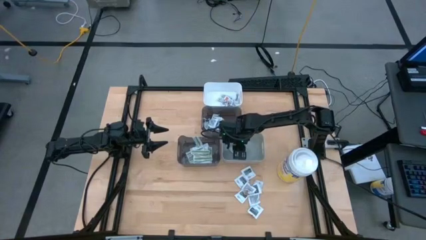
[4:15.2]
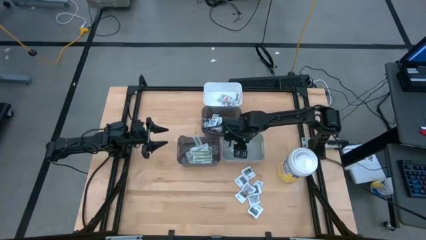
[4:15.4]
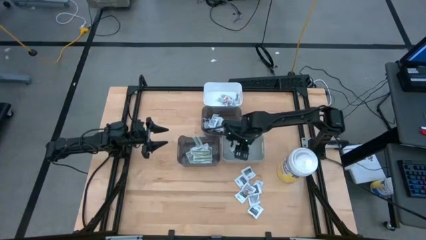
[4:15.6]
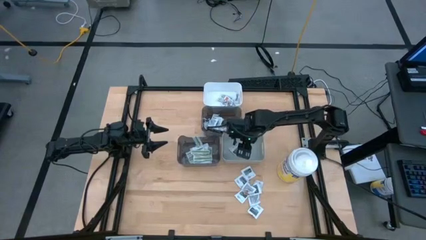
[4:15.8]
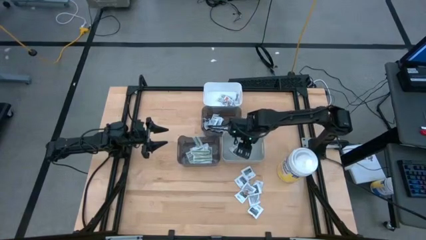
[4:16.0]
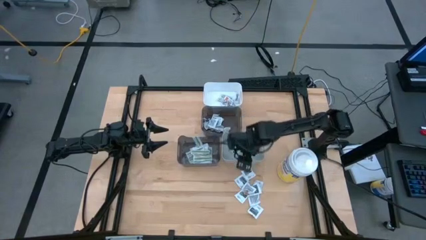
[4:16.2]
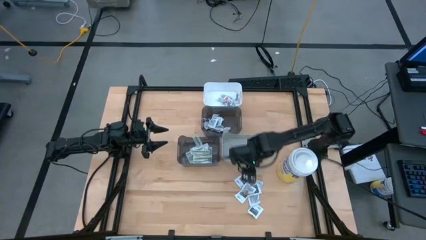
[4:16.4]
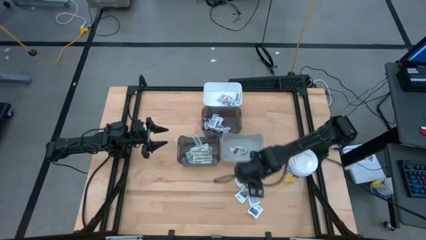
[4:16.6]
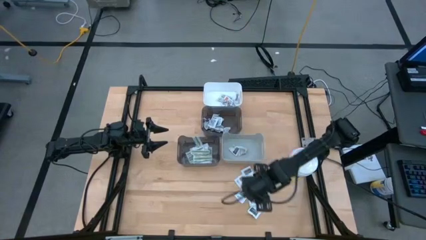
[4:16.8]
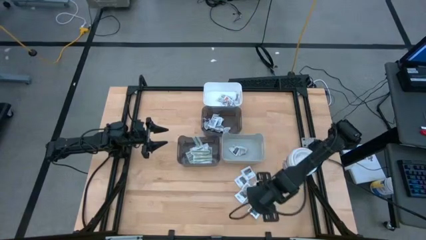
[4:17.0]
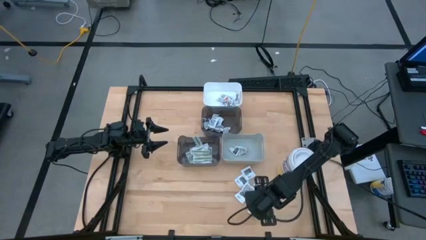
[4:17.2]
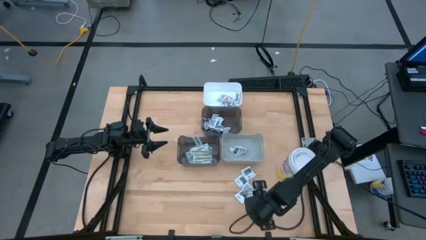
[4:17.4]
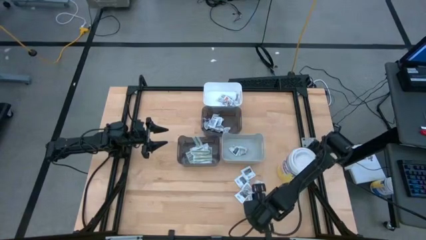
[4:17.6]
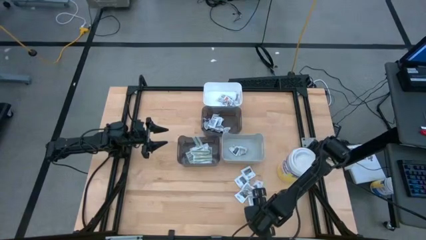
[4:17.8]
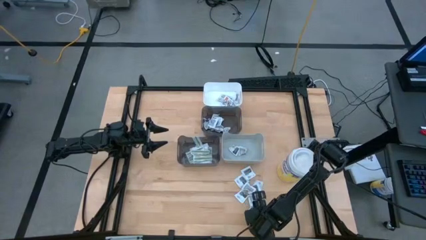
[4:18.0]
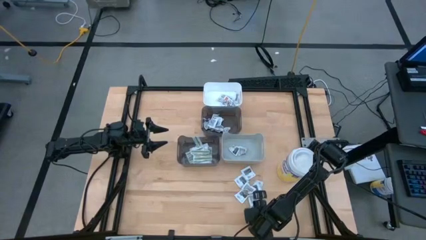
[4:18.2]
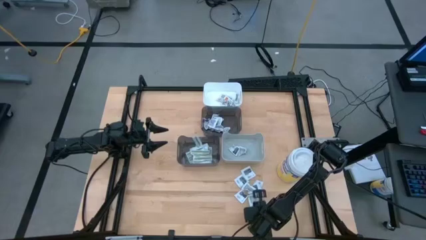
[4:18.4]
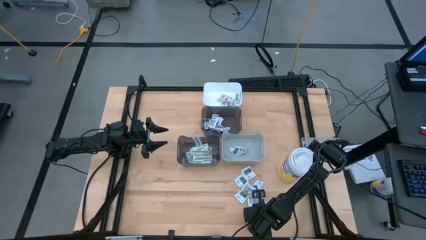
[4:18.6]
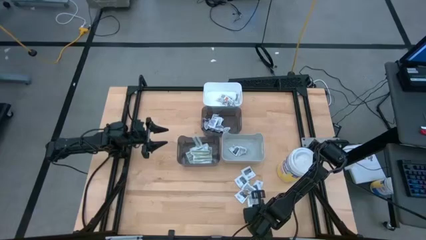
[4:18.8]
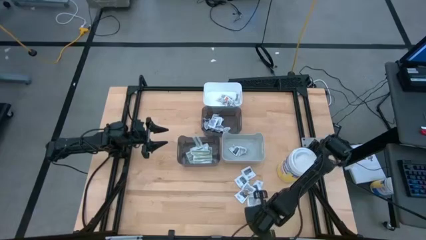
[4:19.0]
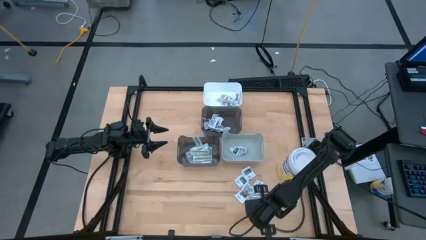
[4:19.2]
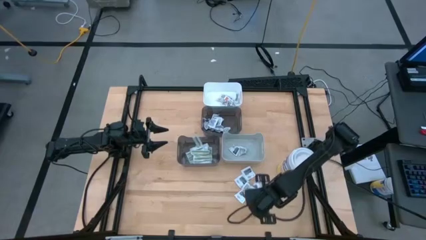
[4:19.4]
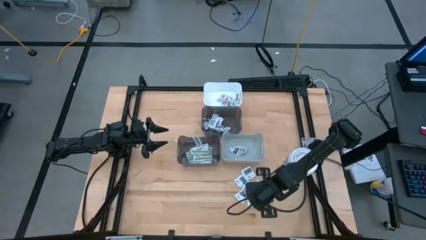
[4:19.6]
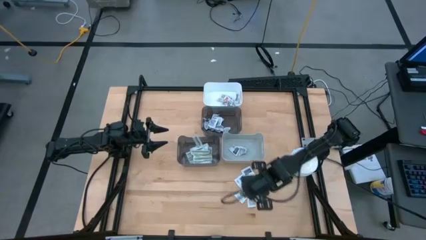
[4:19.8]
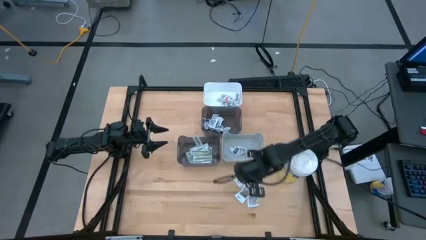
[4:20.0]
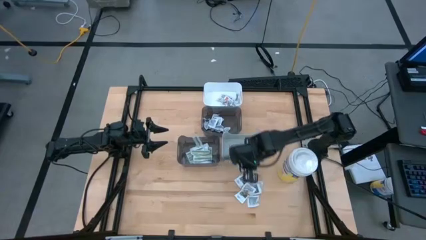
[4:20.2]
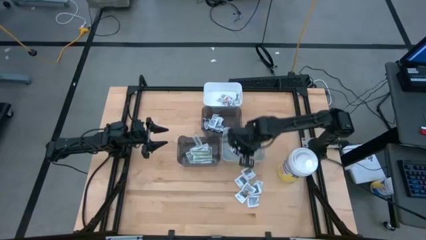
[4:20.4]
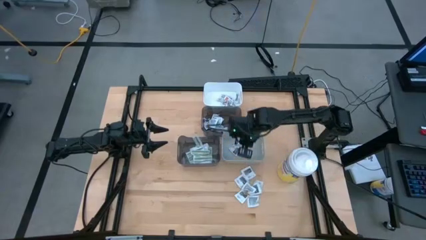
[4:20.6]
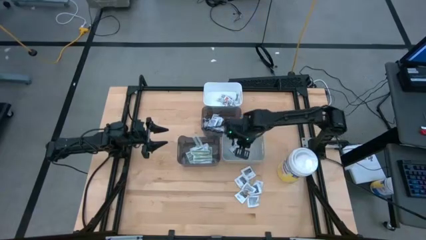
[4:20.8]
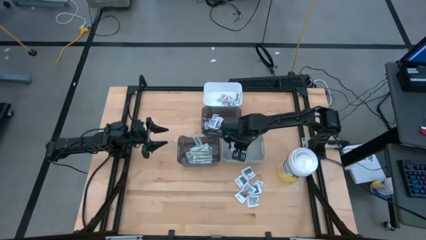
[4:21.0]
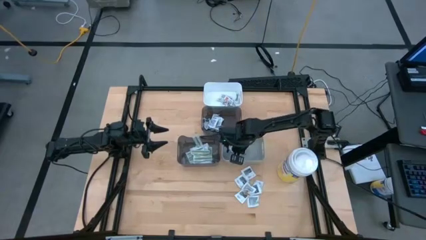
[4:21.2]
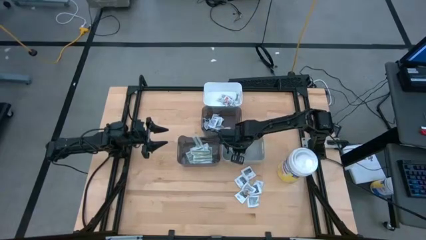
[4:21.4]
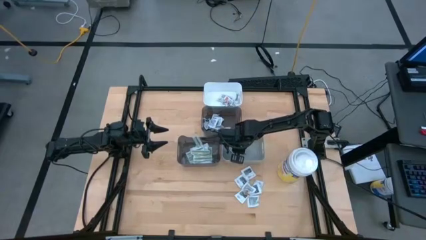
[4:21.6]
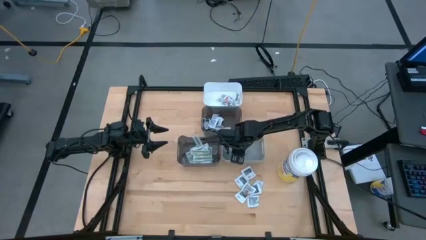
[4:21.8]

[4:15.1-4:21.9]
Task: Pick & Place First Aid Supplies
Put the white towelette pack into the gray bin

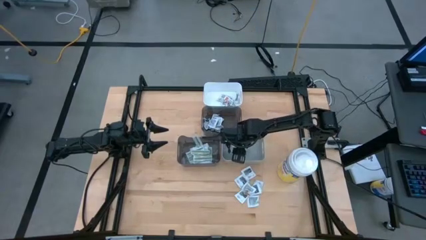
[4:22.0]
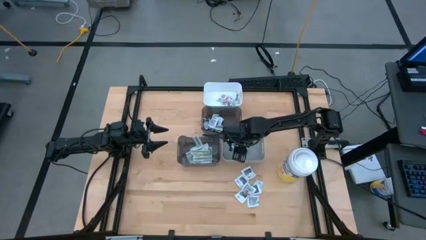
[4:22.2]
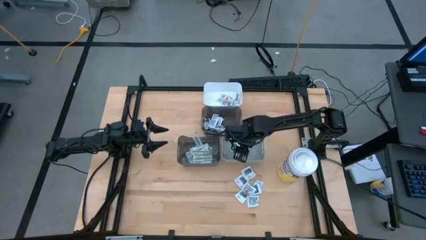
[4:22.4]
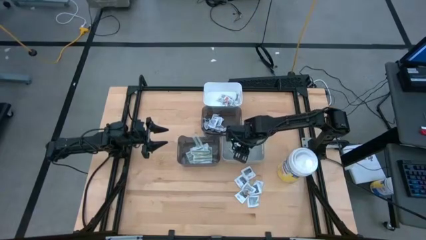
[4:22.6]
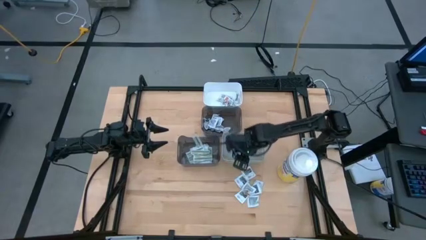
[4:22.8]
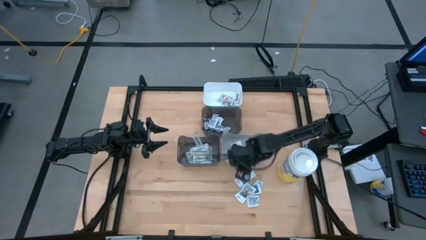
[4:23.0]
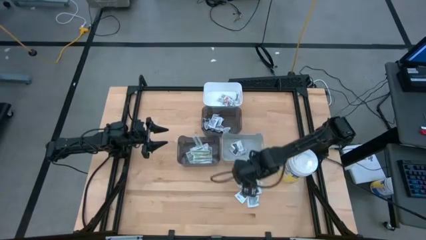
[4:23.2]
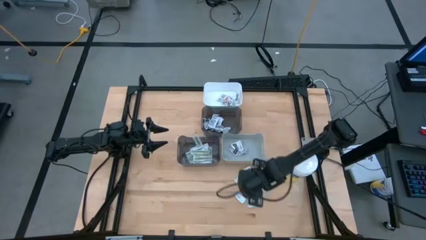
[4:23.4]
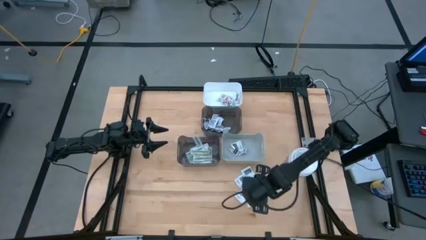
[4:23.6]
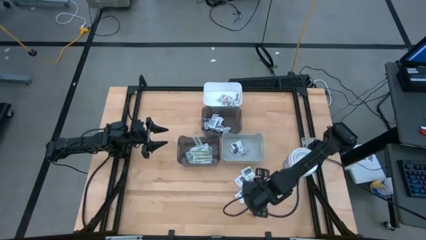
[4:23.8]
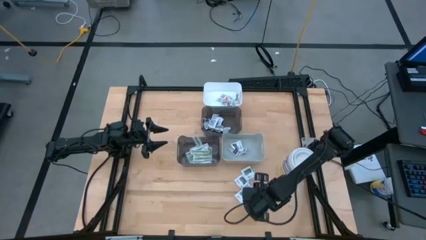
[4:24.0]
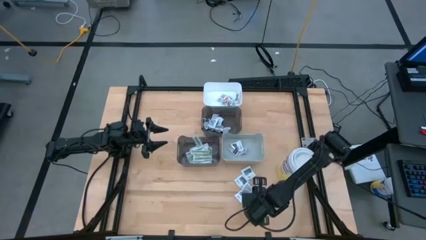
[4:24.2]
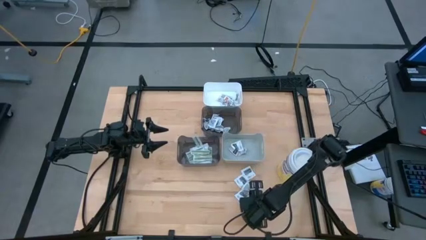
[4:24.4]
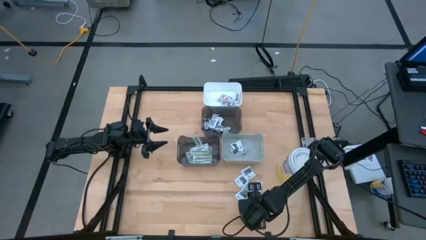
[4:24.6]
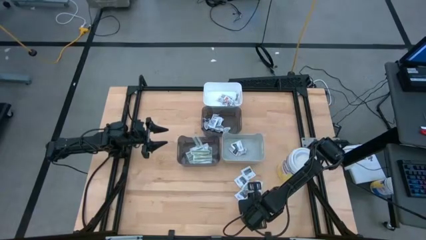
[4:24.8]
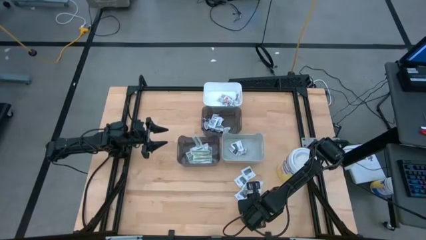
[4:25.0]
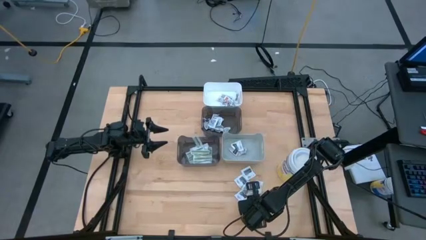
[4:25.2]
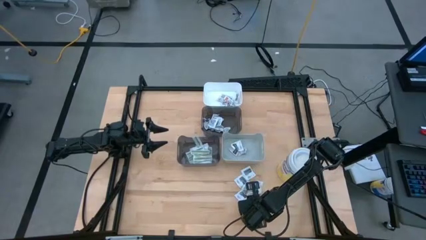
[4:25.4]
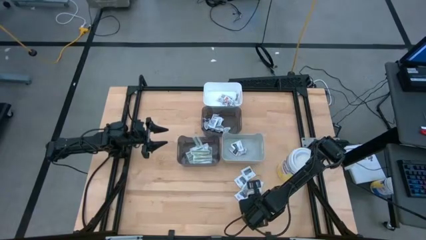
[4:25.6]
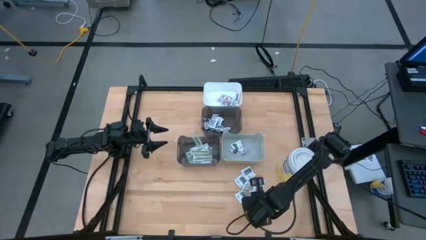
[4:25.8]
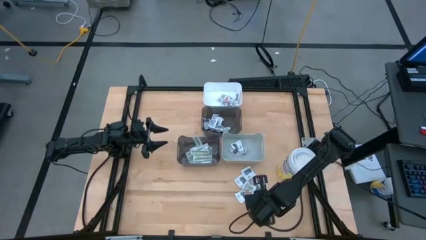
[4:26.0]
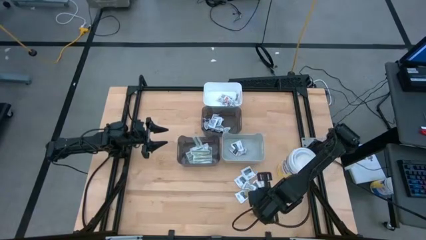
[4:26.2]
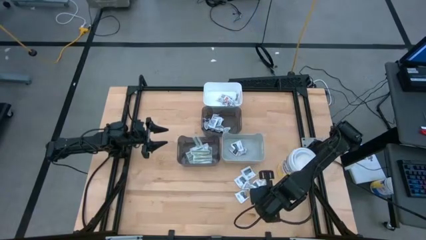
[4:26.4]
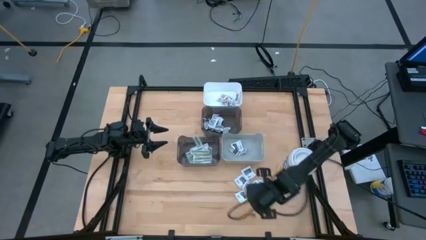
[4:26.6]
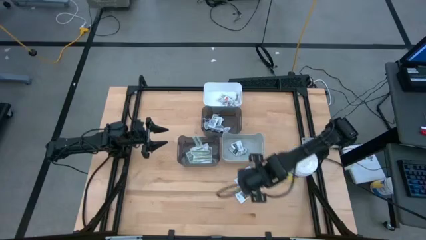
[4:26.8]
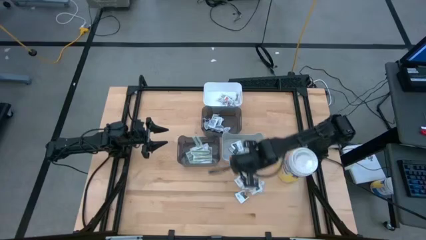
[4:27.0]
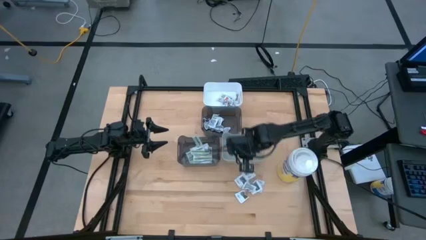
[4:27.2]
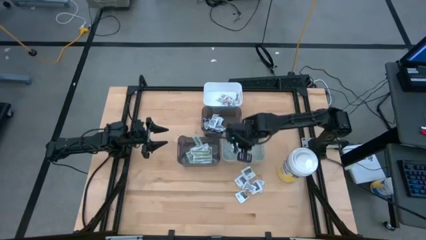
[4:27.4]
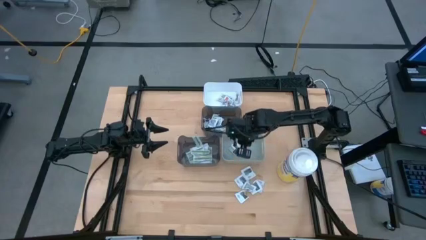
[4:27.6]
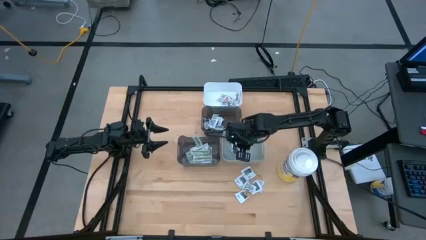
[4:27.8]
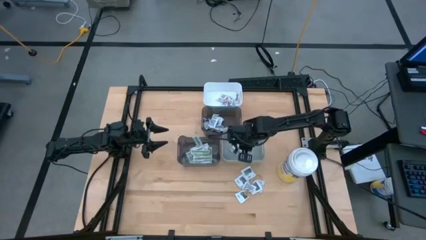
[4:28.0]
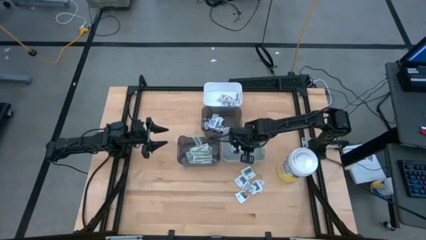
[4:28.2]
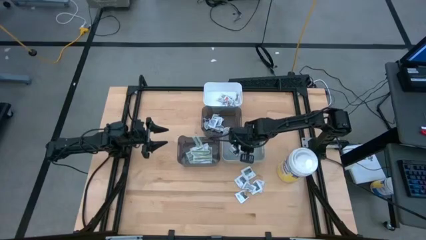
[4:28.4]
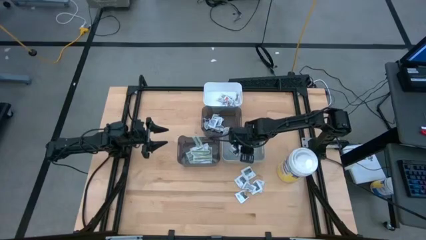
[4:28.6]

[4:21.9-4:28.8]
Put the white towelette pack into the gray bin
